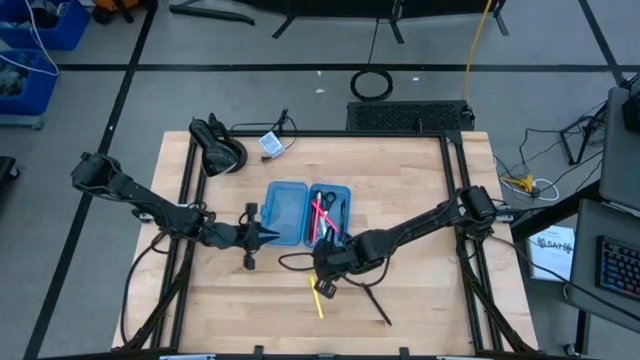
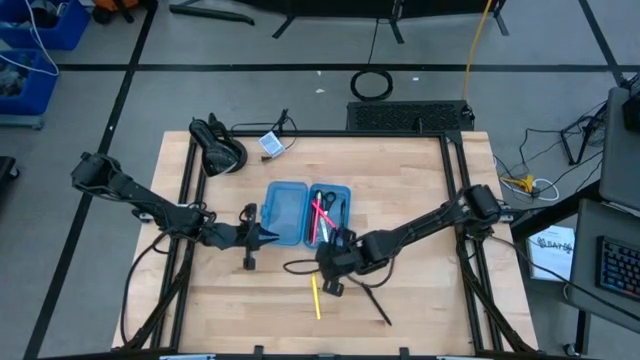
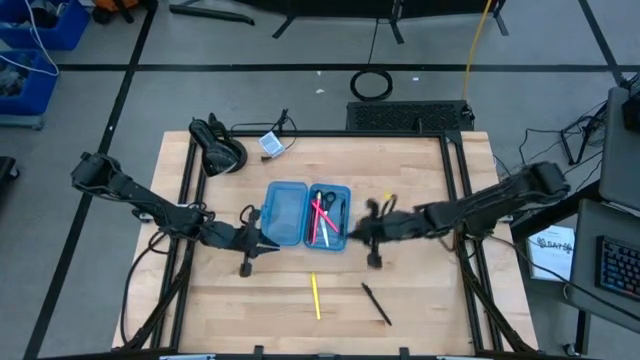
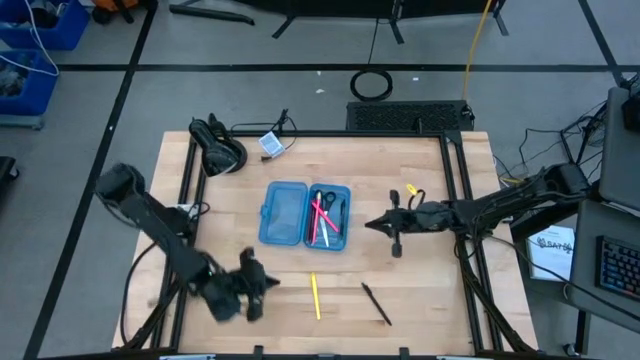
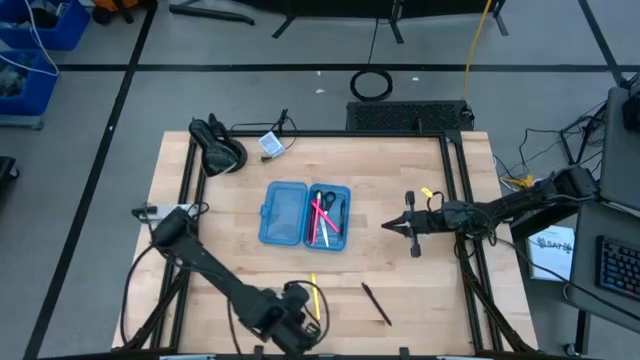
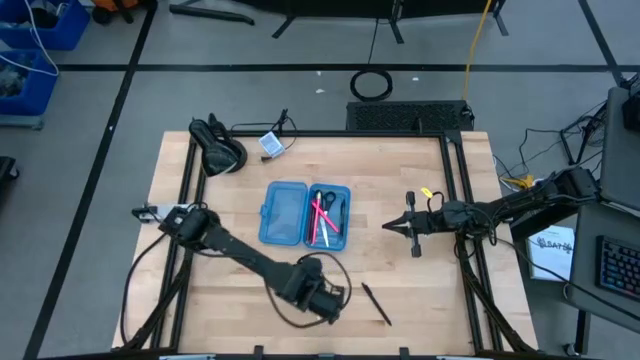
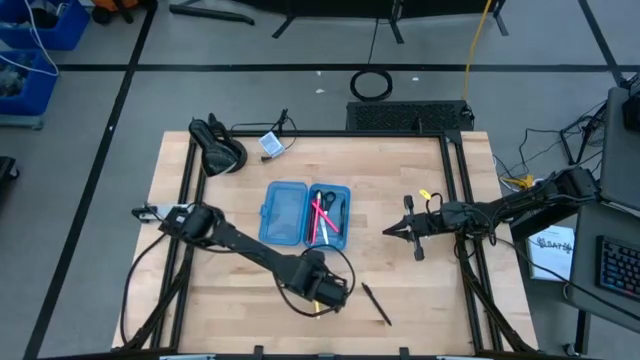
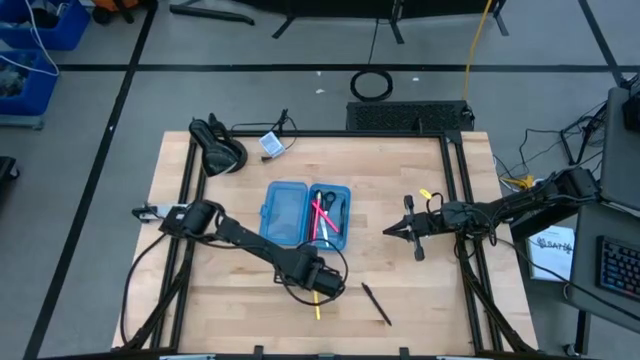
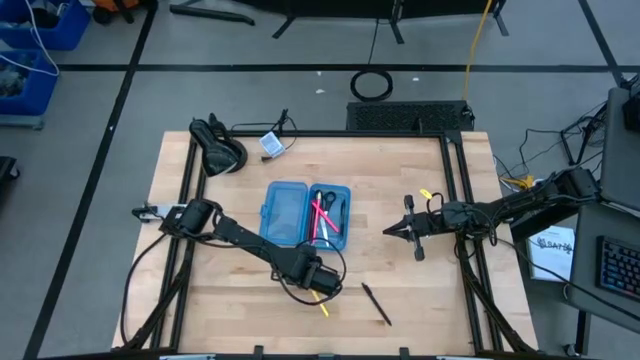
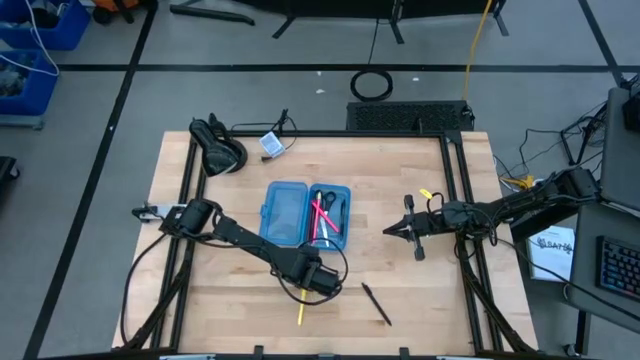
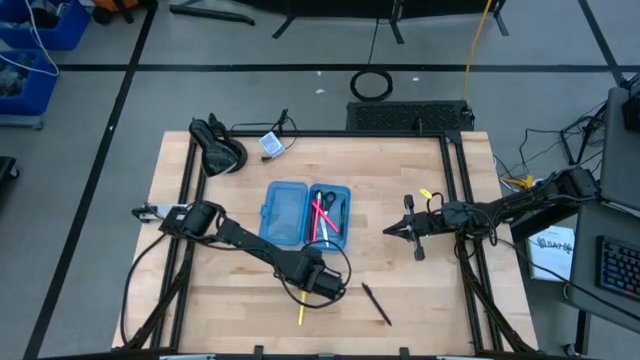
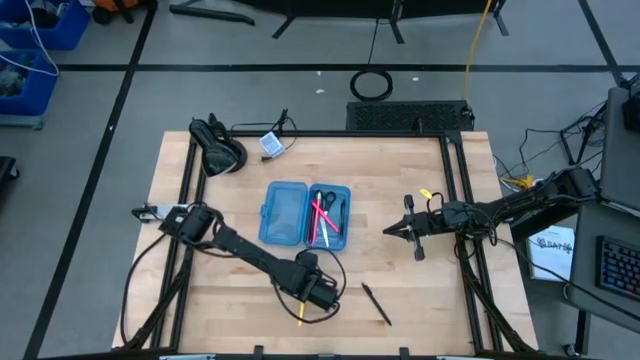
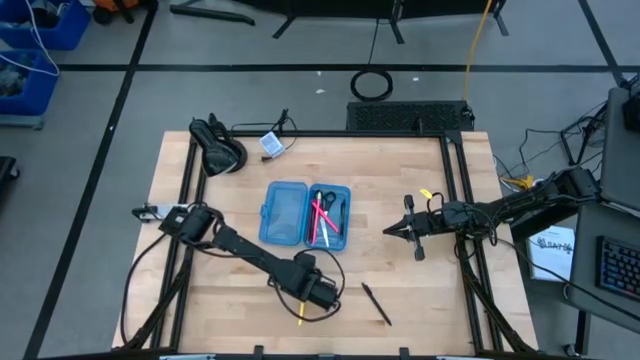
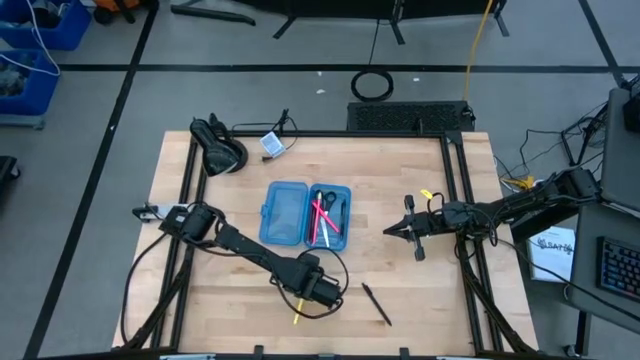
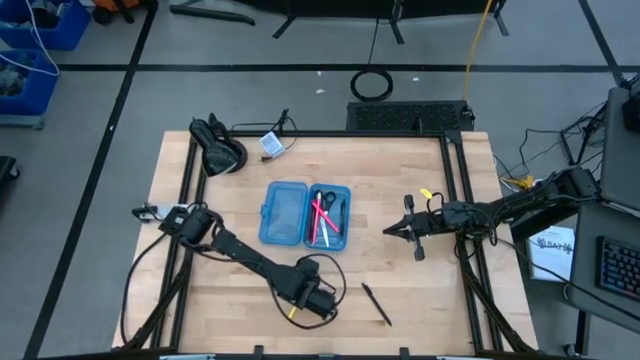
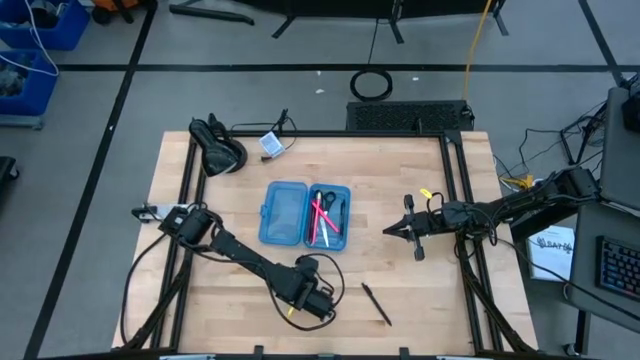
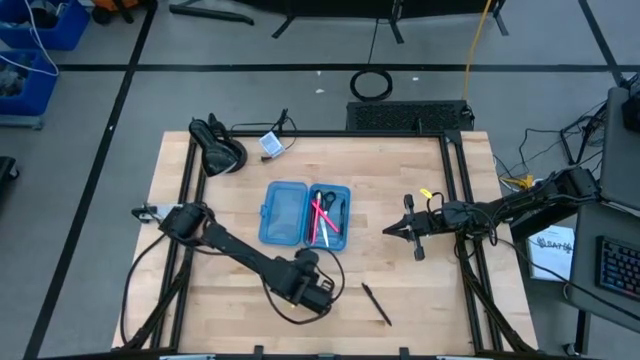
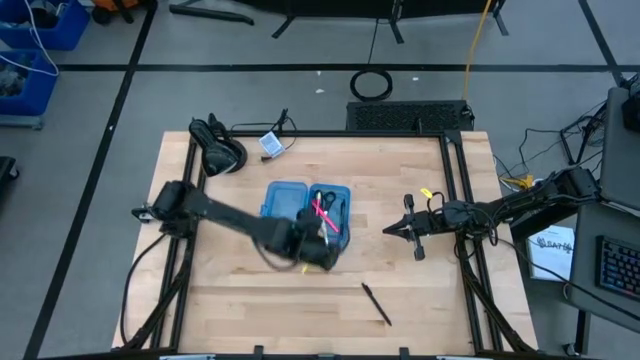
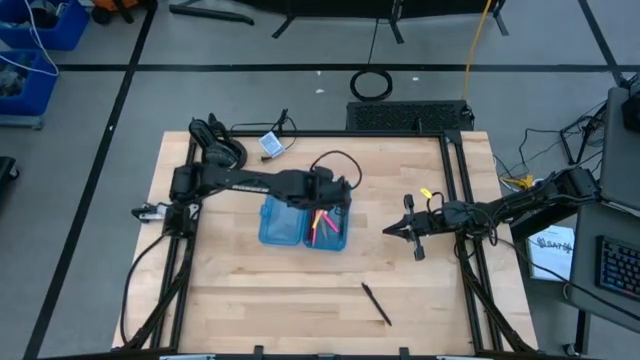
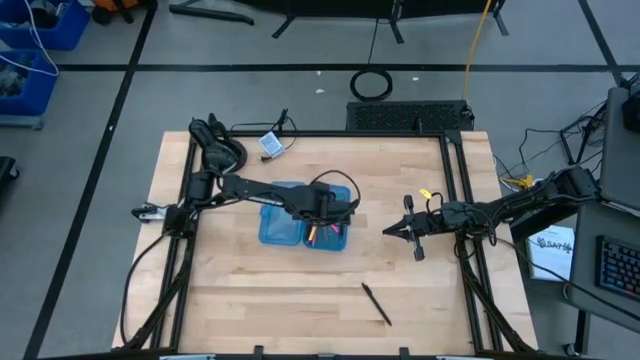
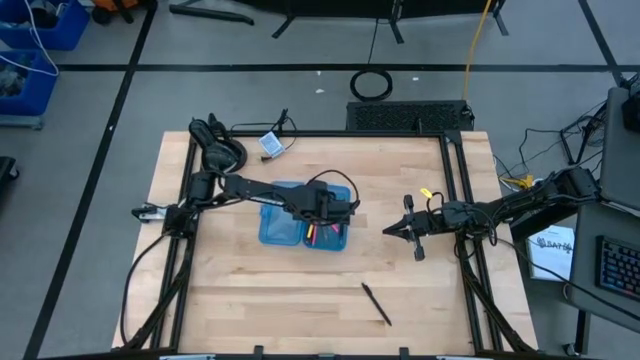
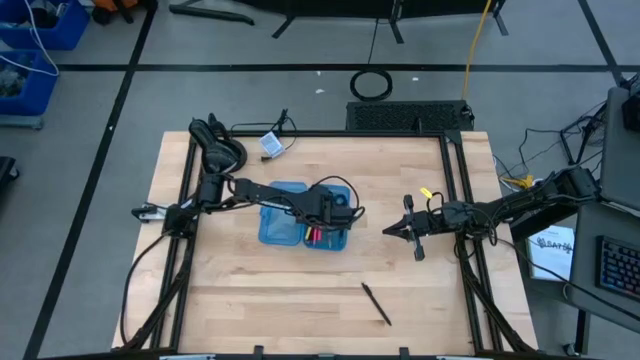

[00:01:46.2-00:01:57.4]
Task: Pick & place school supplies into a supply box
Put the yellow pen into the blue supply box

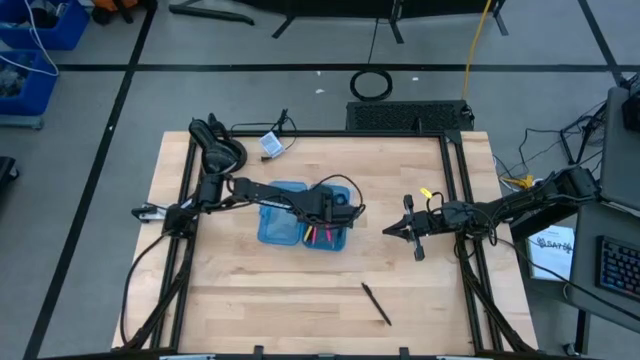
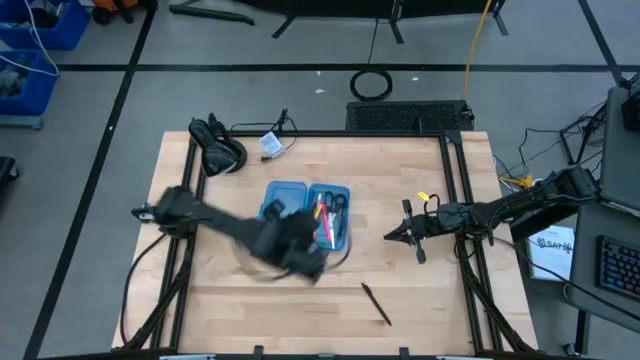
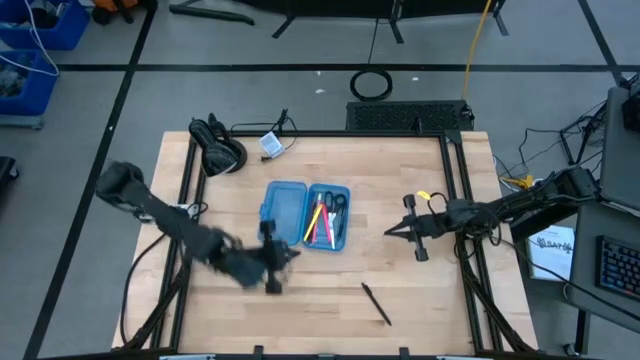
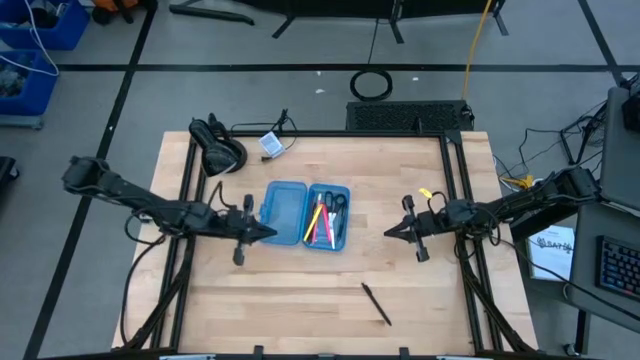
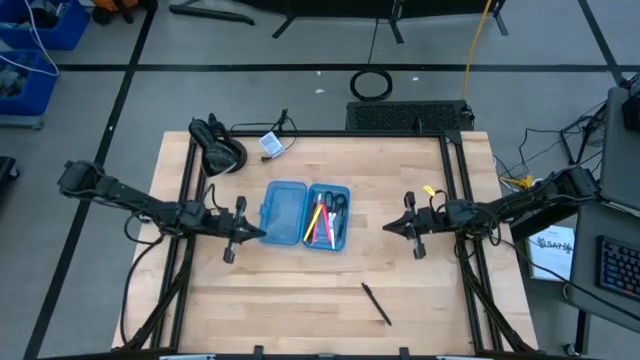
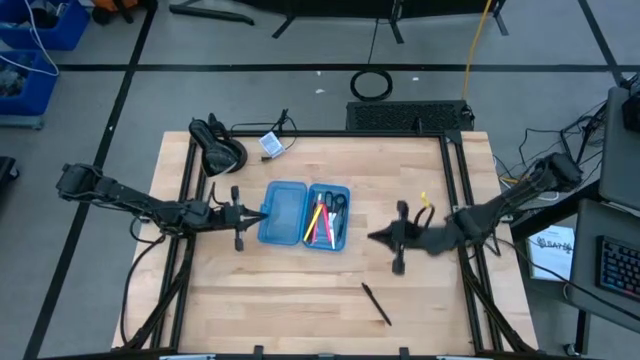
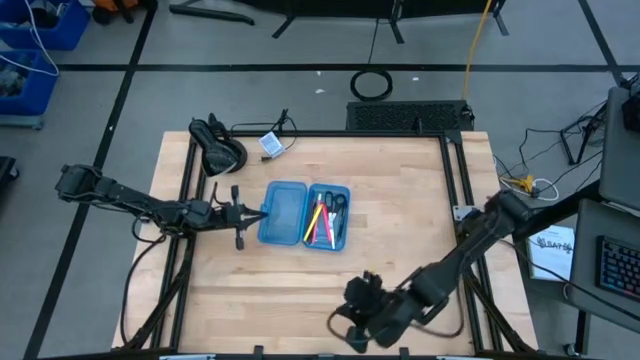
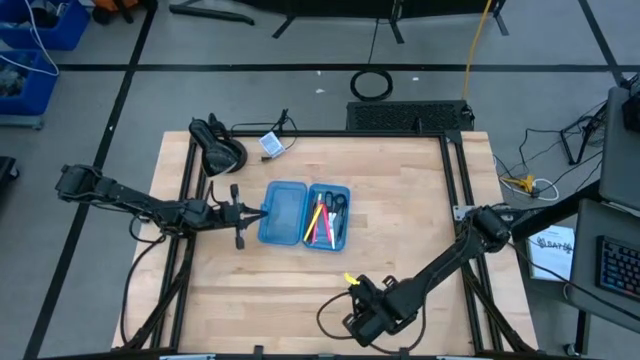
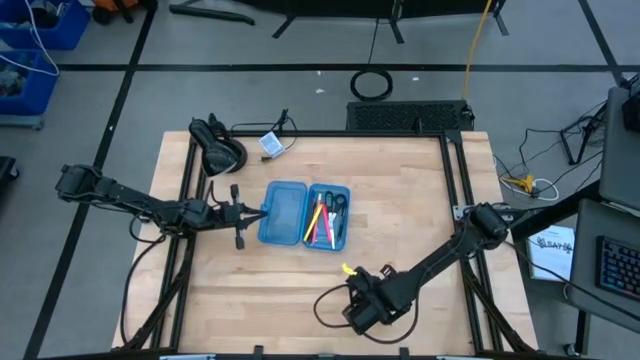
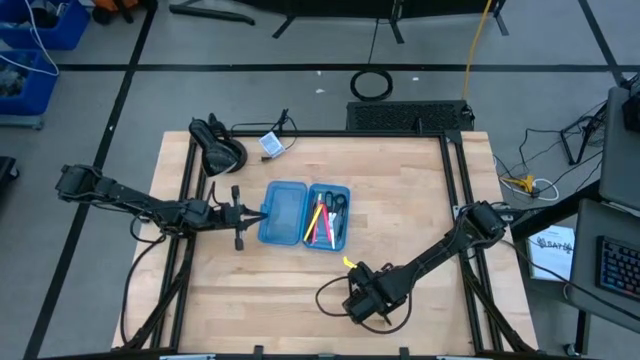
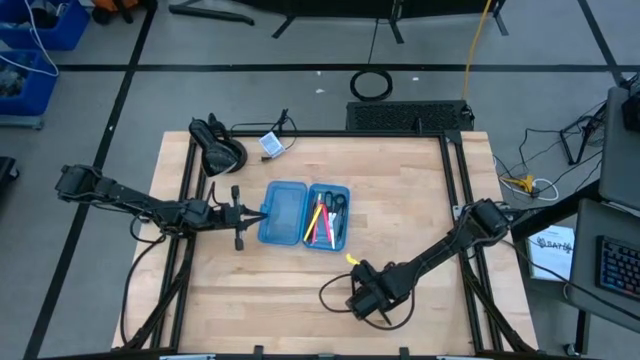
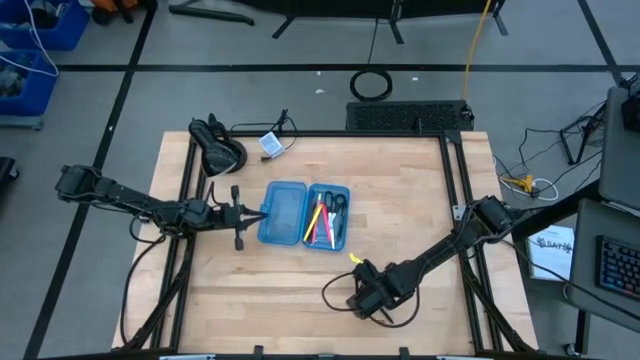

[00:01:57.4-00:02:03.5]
Put the black pen into the blue supply box

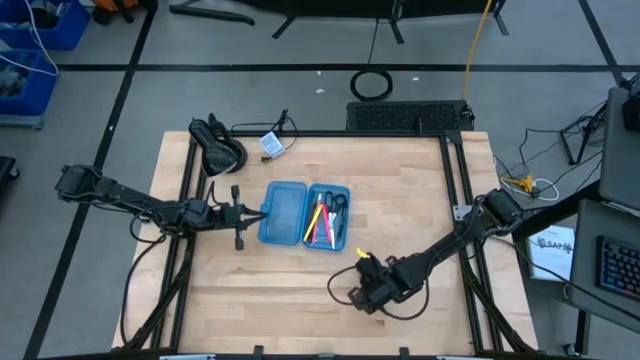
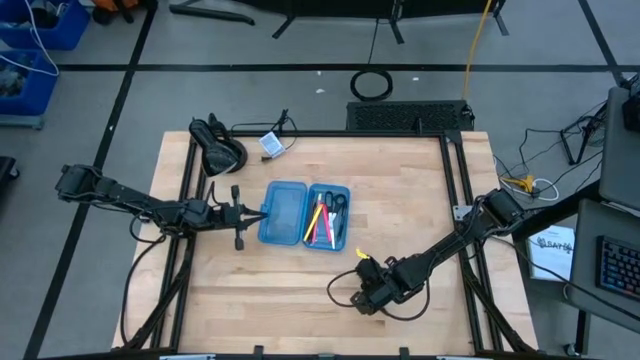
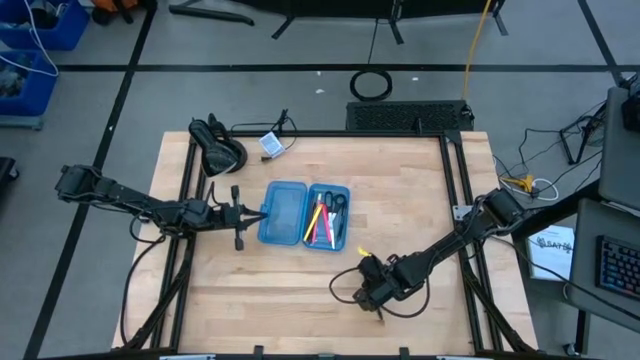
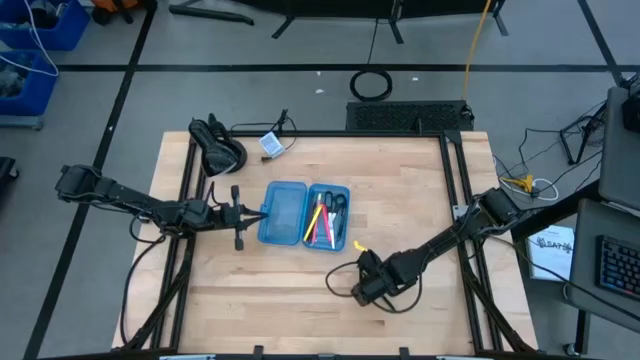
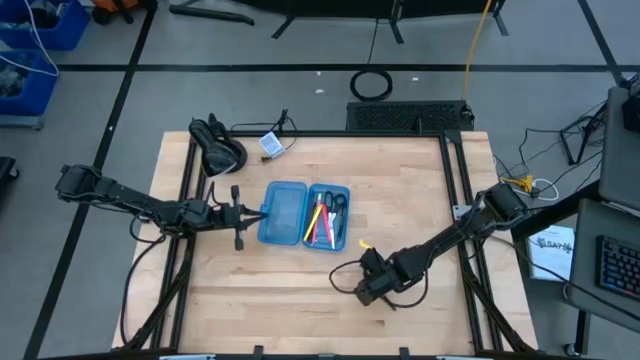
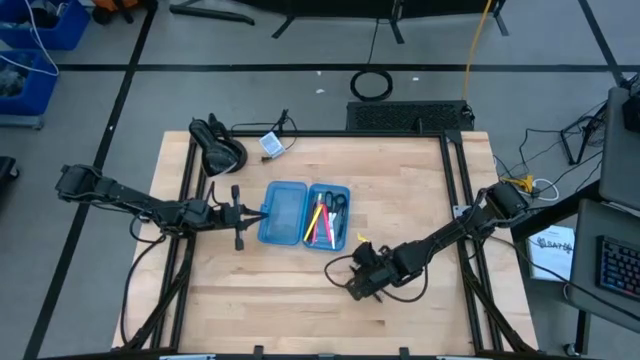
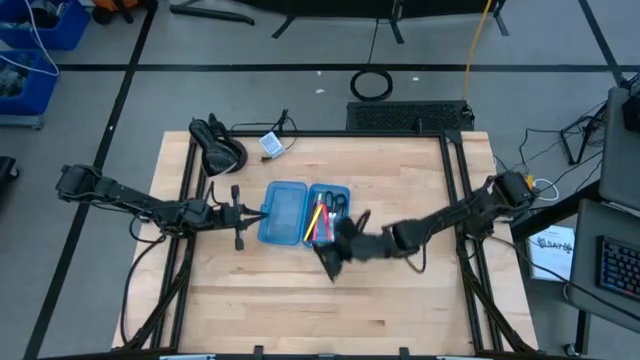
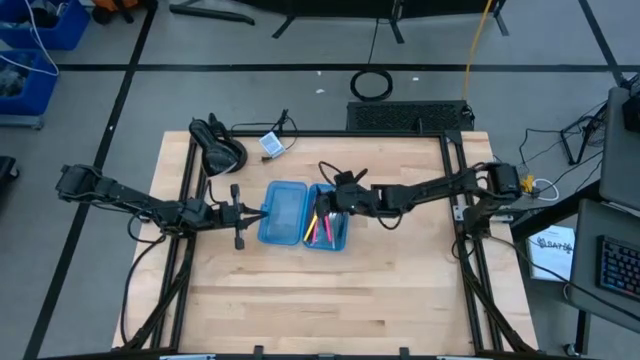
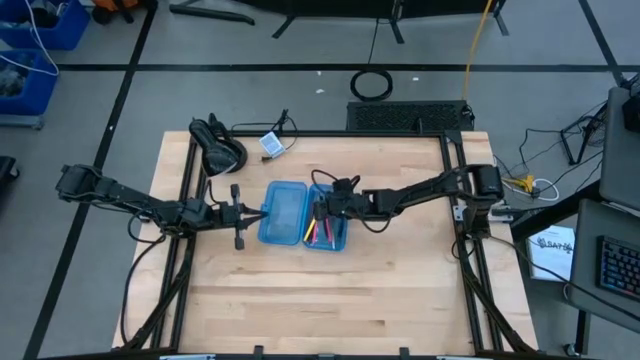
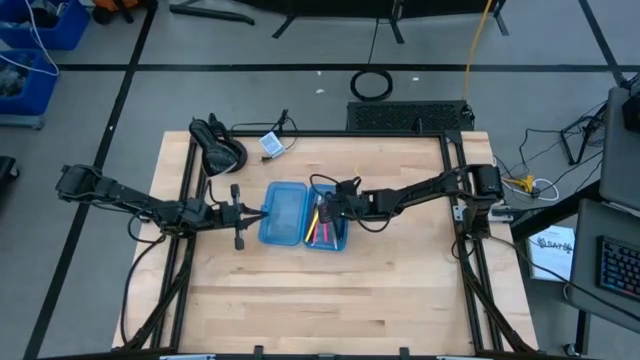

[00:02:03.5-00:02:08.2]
Put the black pen into the blue supply box
